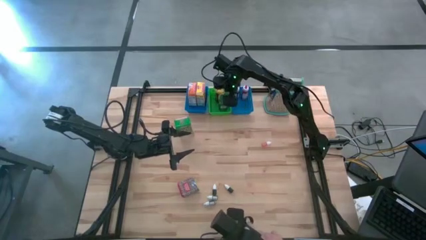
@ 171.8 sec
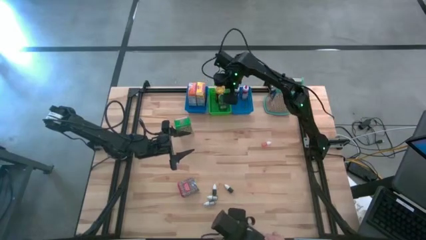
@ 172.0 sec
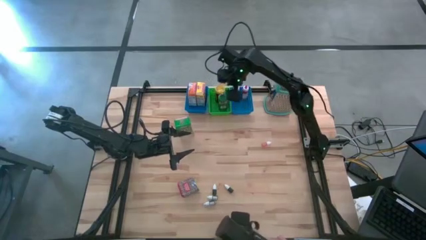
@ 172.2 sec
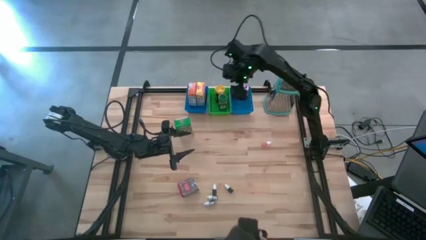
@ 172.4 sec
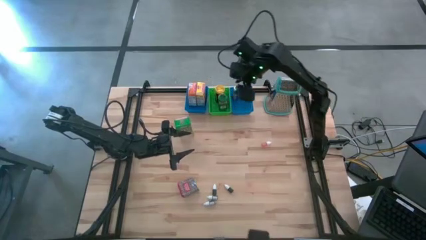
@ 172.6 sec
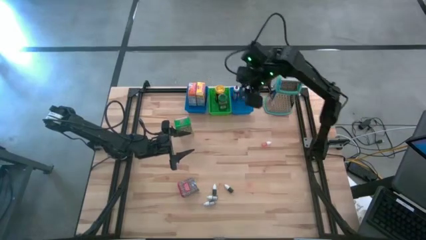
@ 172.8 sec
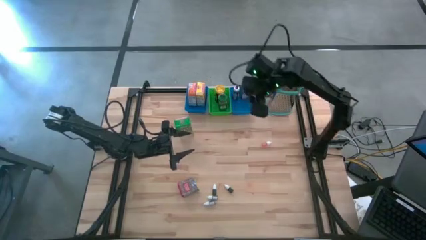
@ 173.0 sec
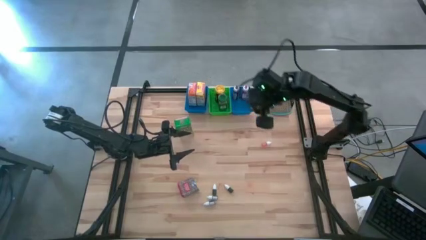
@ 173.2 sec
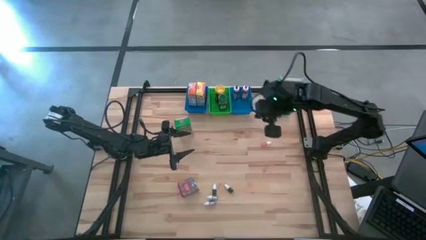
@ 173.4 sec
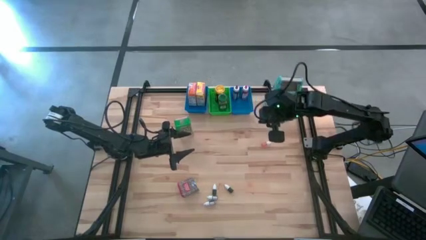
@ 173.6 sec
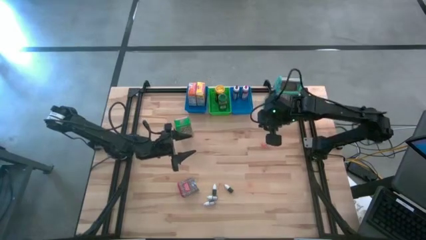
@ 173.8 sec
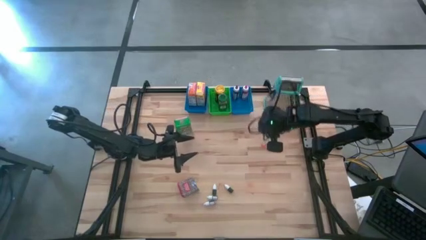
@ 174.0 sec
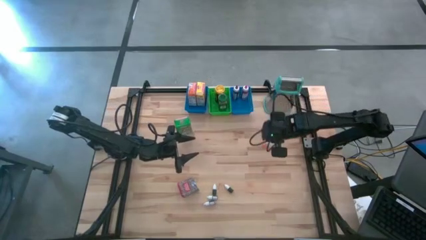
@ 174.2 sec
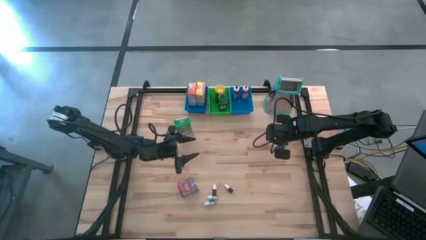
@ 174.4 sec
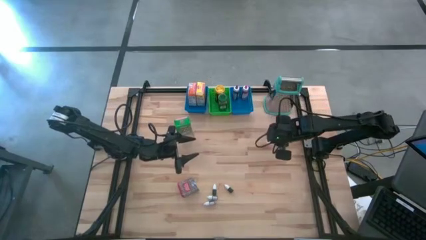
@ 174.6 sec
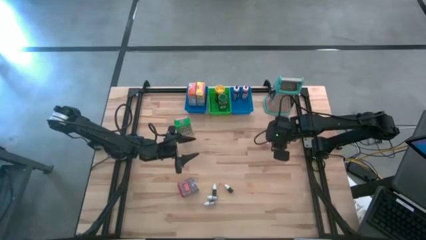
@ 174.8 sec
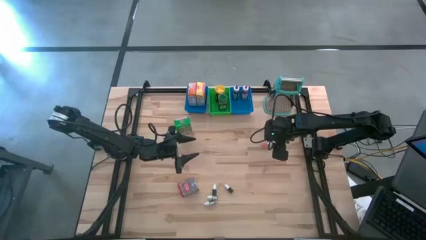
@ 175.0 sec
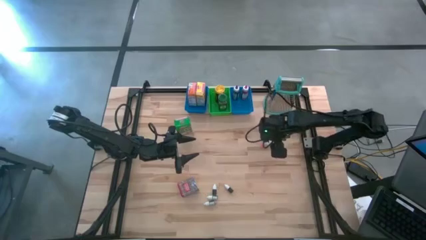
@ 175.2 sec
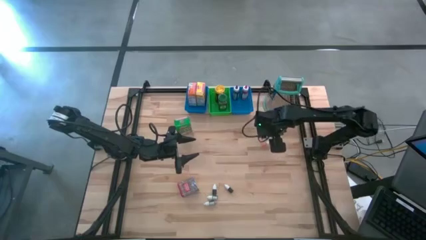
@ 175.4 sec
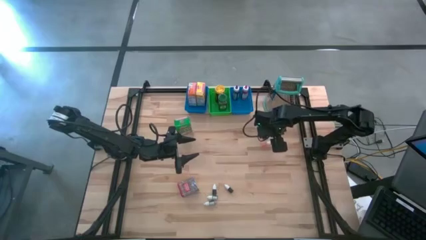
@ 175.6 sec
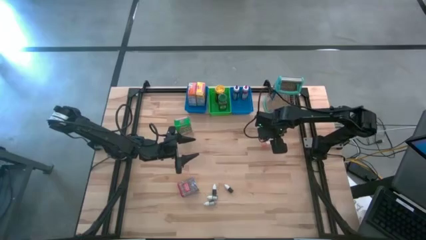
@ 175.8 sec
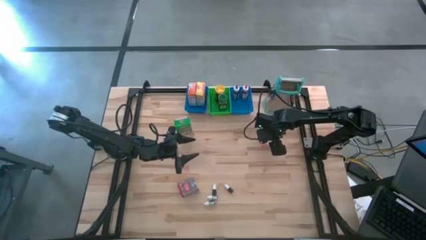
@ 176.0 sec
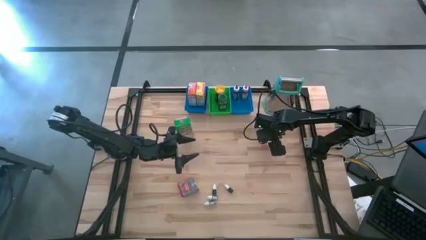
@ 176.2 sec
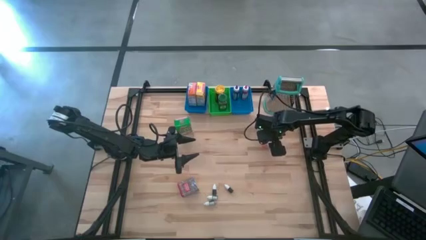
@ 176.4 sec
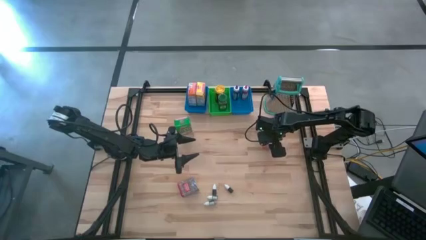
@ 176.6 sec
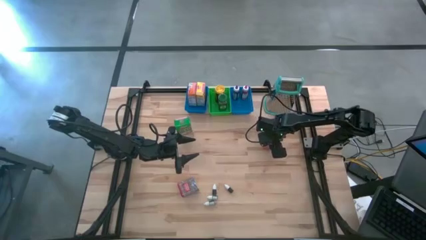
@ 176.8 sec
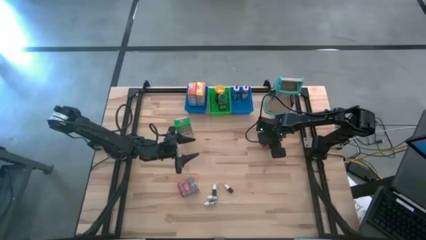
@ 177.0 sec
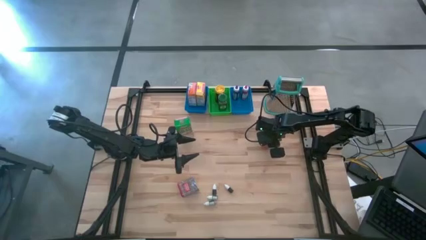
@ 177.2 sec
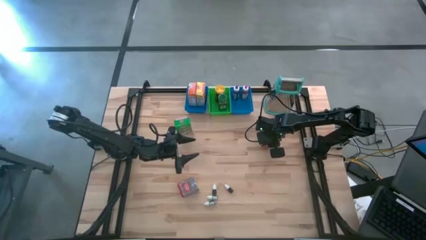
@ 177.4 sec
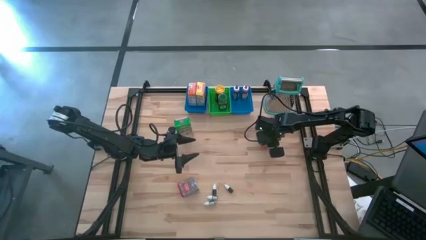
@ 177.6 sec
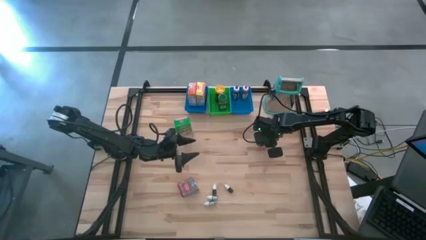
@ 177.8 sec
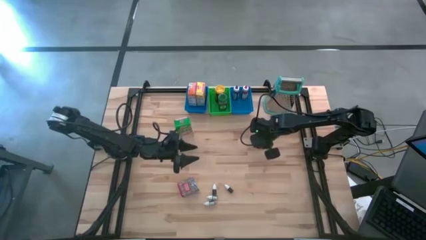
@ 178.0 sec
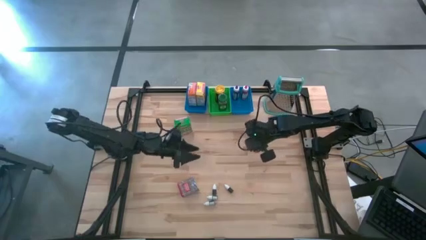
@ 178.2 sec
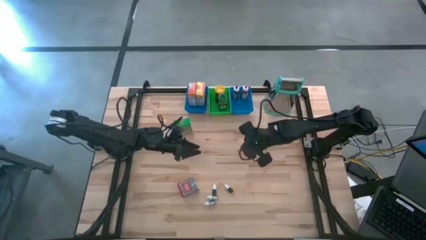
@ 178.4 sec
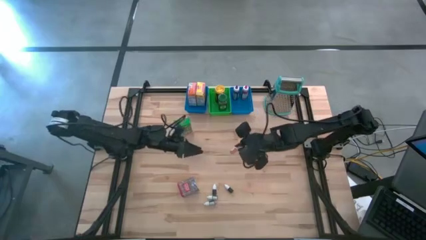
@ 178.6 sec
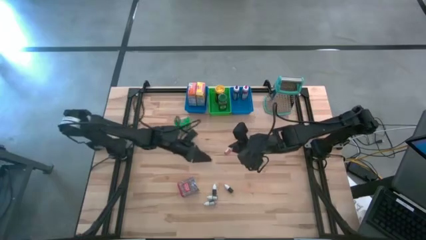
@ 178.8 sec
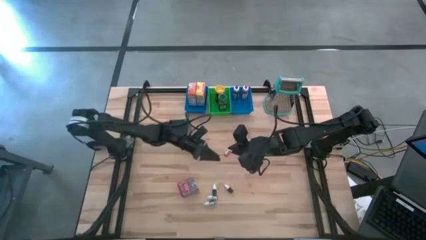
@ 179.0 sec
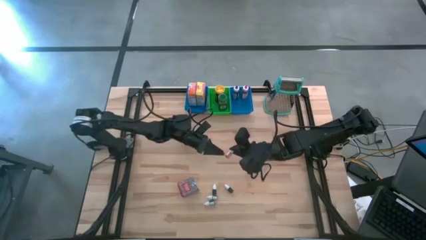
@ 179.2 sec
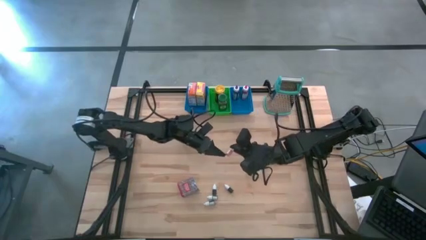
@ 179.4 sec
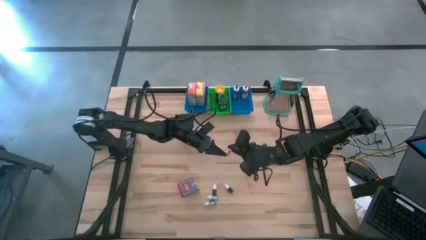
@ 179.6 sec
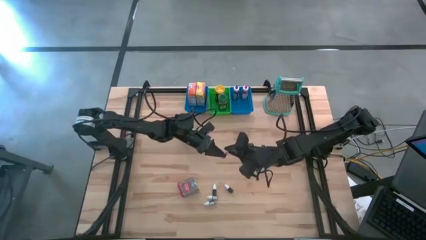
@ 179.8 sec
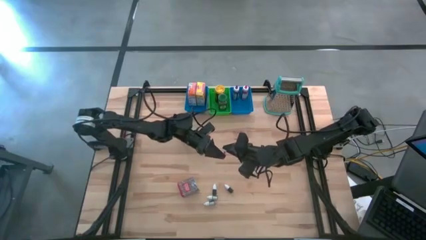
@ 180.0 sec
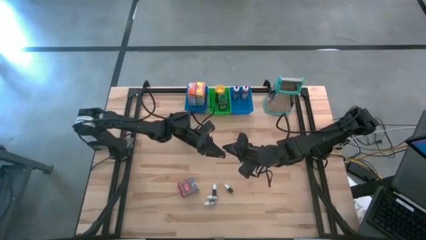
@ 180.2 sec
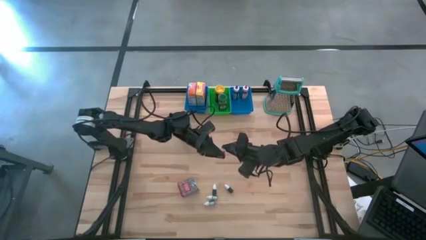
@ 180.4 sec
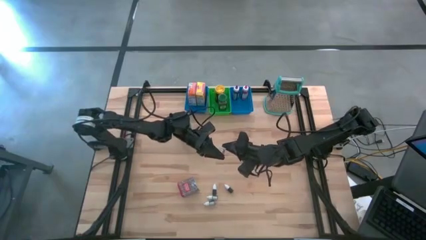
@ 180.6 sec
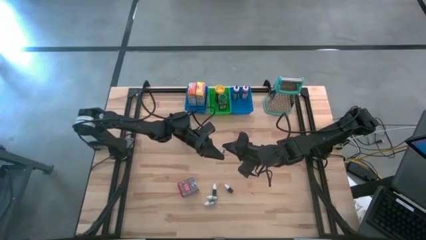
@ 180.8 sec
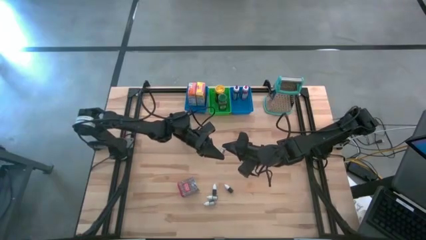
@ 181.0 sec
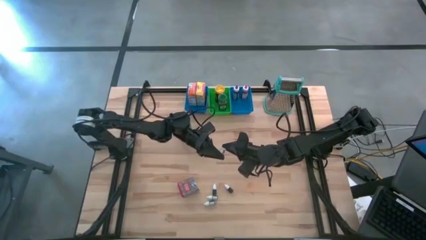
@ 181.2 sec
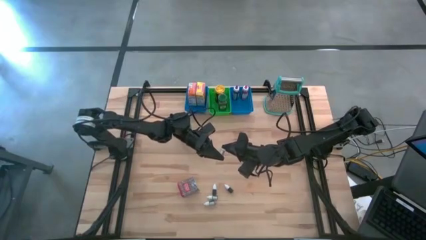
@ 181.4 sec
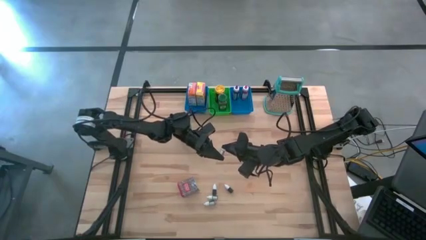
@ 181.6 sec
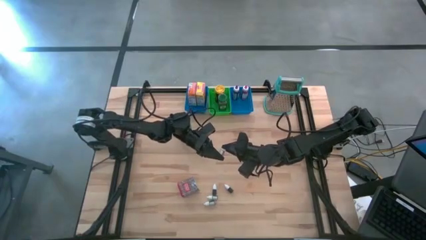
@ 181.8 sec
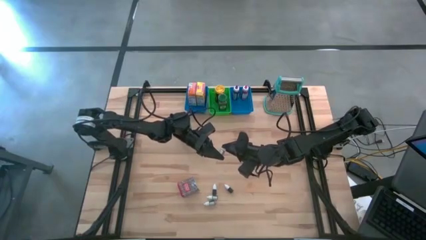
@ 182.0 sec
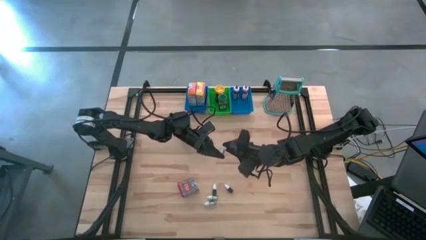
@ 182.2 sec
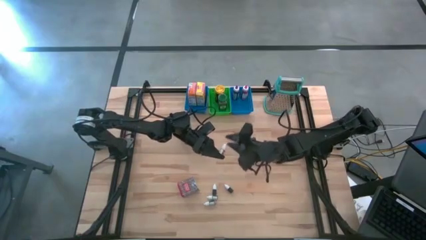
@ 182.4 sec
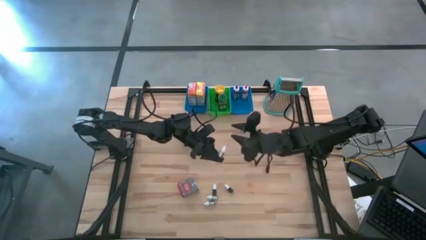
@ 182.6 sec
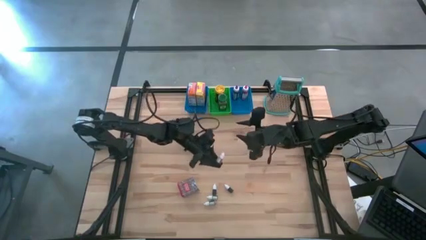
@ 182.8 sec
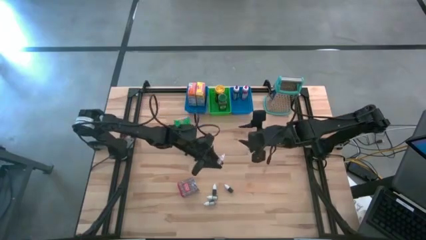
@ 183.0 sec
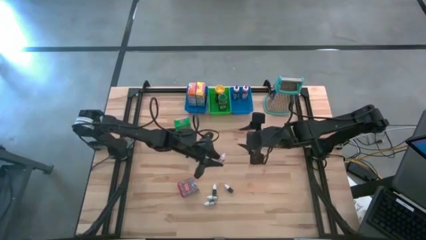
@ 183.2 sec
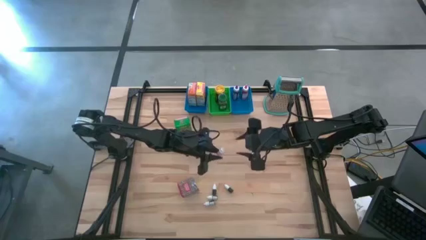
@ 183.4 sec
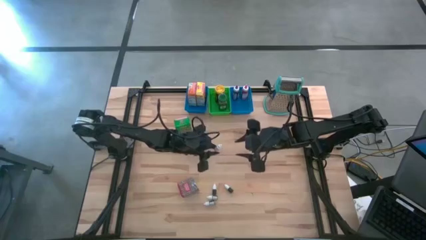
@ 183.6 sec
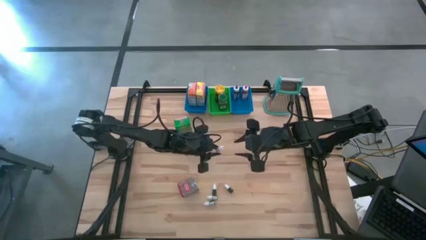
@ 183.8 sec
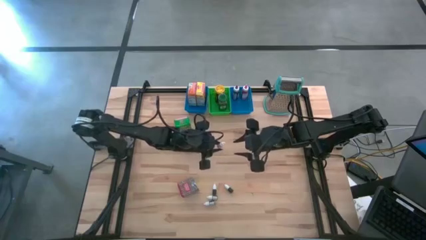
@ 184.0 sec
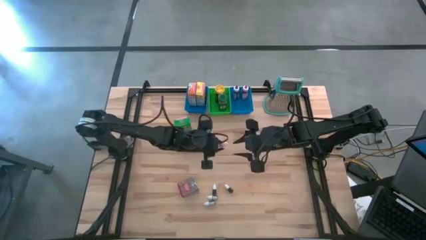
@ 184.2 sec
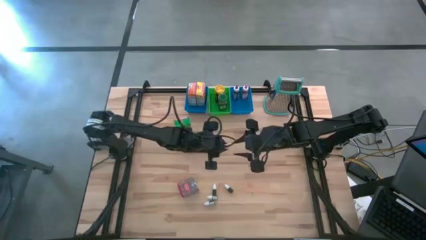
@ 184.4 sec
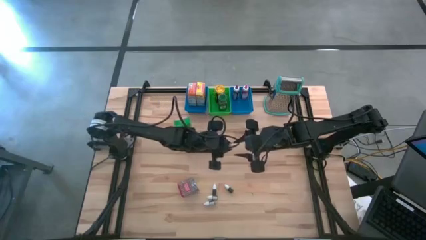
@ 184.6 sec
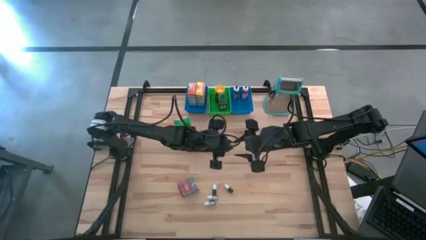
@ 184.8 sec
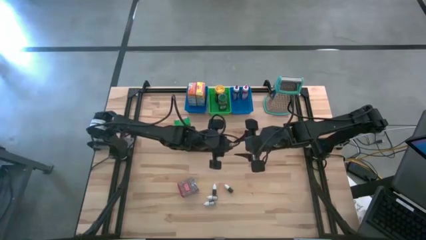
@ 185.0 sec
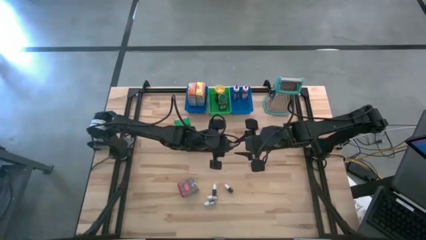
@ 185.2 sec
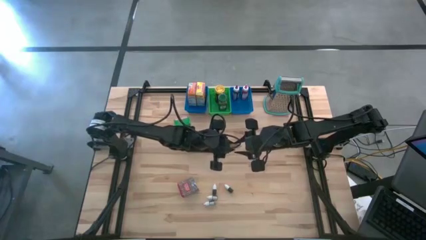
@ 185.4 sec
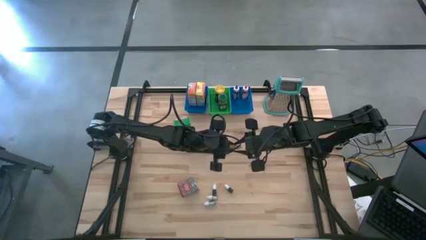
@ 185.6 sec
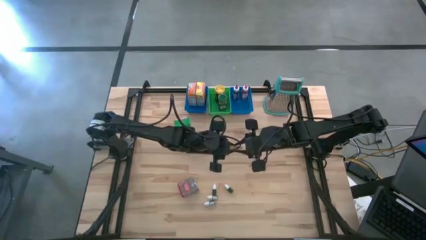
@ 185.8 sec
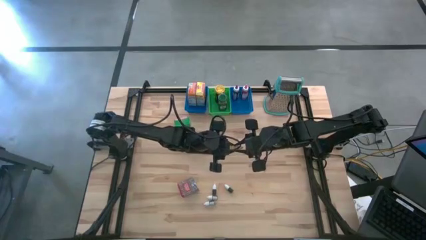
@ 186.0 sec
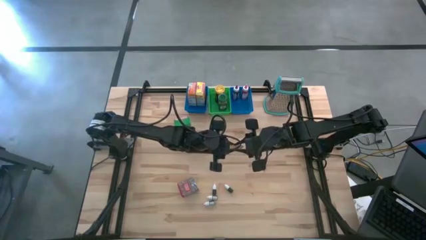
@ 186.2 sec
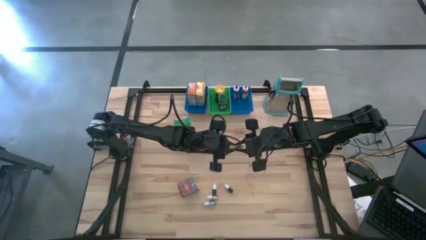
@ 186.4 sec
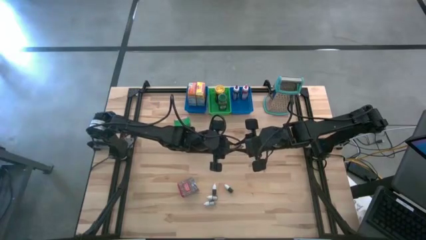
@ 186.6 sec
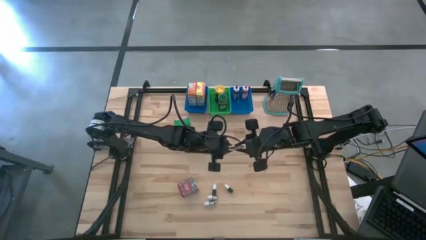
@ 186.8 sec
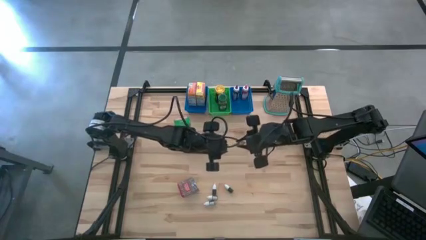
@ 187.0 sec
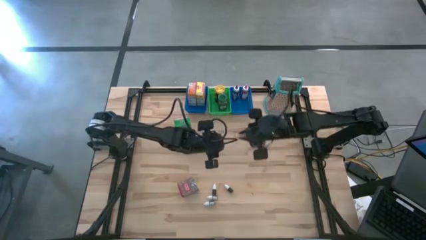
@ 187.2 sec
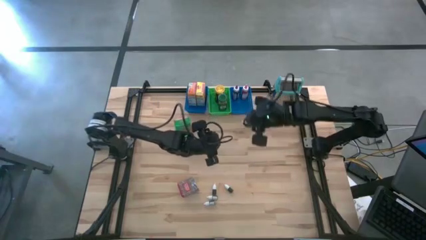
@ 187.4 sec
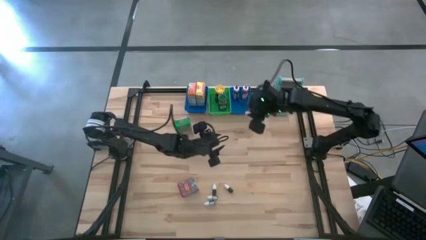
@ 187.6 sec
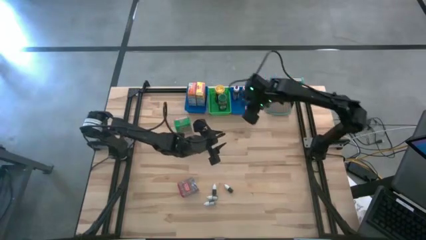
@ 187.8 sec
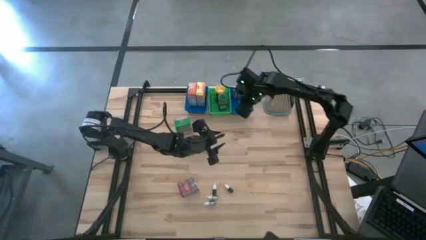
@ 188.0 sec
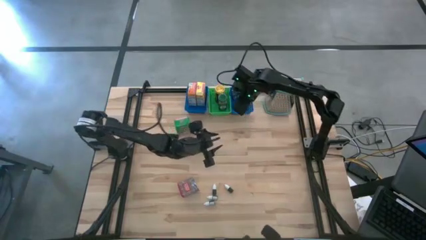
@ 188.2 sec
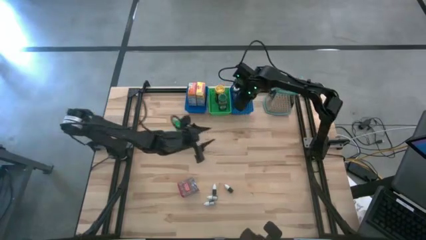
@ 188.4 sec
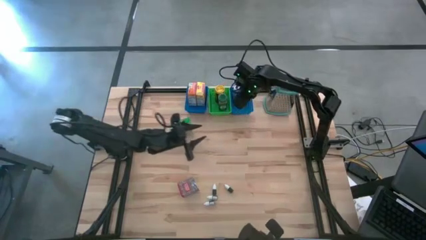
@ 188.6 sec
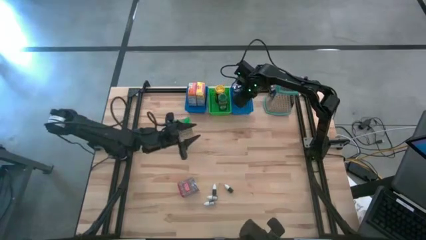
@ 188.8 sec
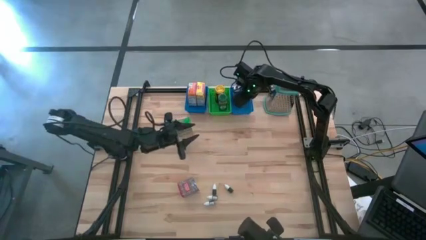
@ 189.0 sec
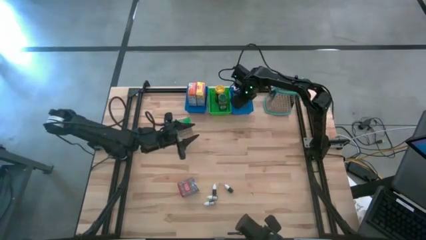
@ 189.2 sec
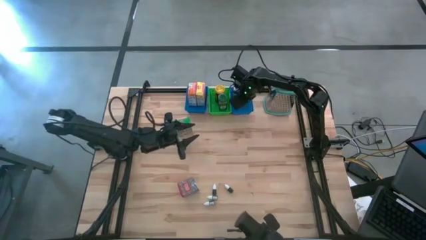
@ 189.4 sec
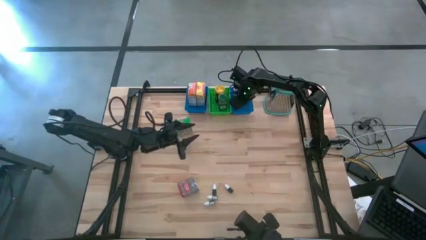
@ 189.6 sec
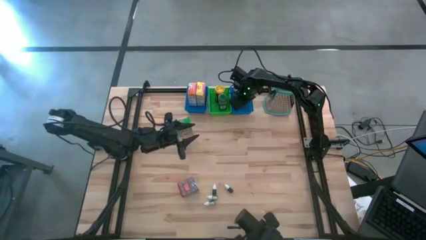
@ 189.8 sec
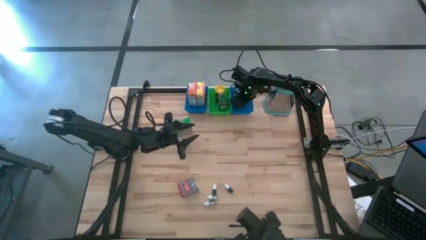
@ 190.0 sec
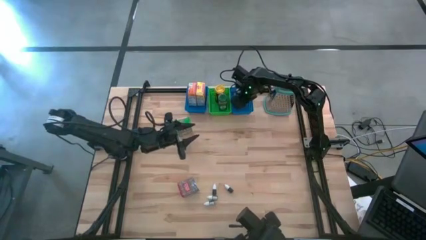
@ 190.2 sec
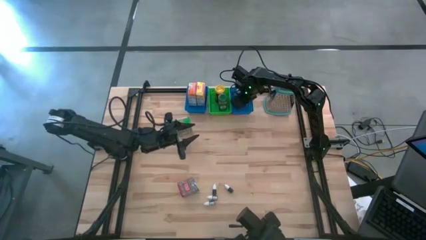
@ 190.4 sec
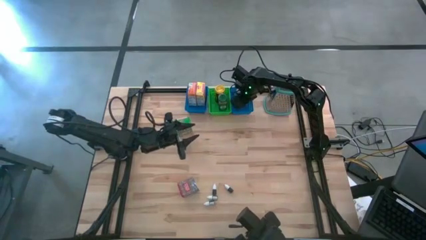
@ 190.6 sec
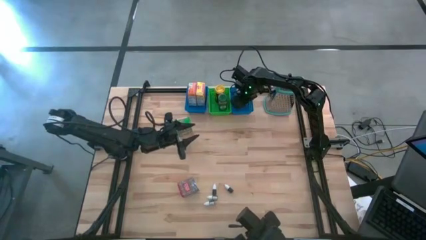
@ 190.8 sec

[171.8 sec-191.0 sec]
Task: Pick & Place Kitchen Items
Put the small orange food coloring bottle into the right blue bin
